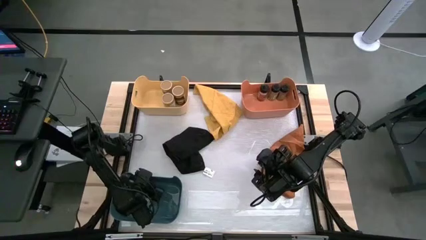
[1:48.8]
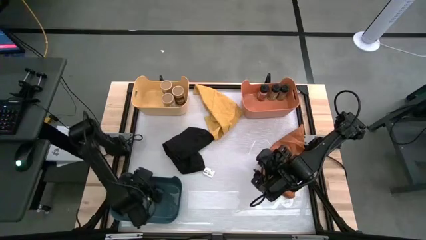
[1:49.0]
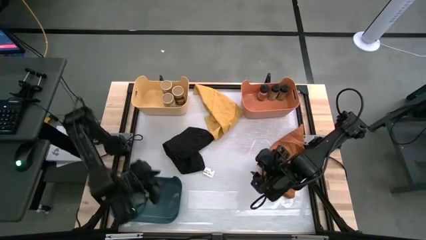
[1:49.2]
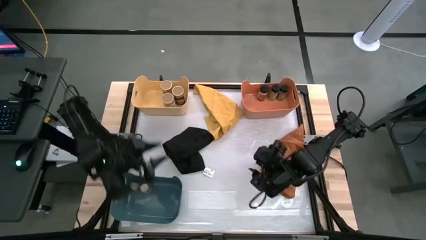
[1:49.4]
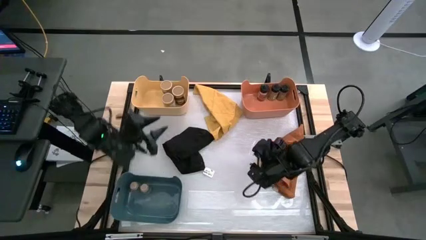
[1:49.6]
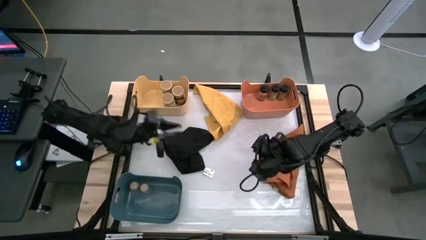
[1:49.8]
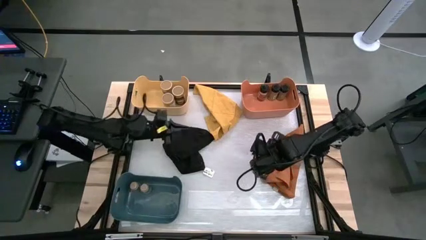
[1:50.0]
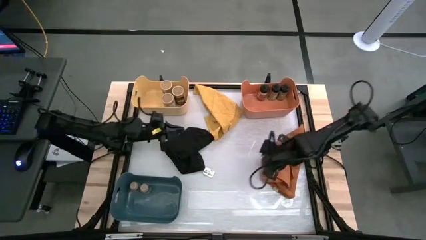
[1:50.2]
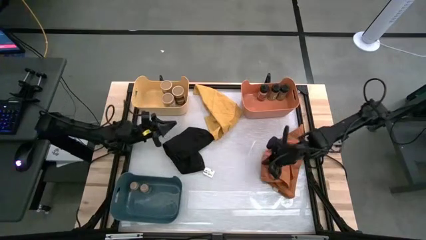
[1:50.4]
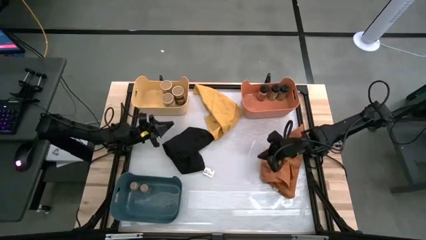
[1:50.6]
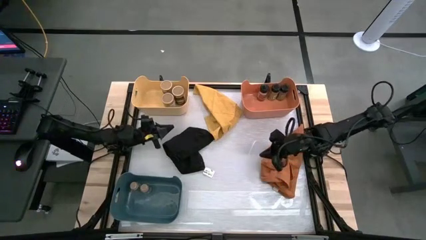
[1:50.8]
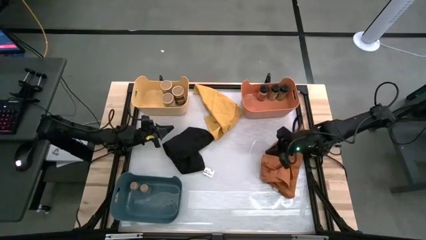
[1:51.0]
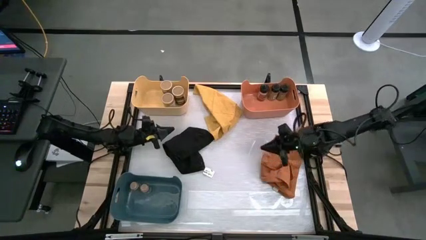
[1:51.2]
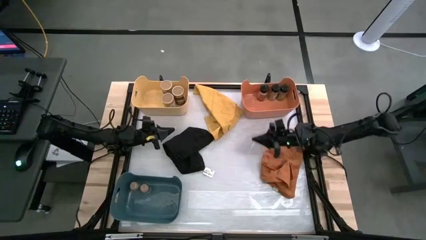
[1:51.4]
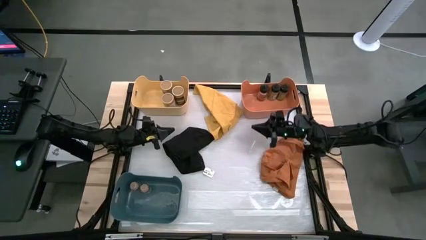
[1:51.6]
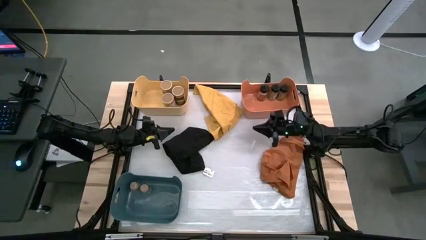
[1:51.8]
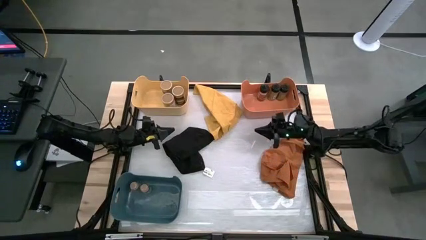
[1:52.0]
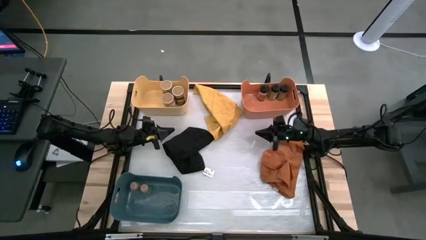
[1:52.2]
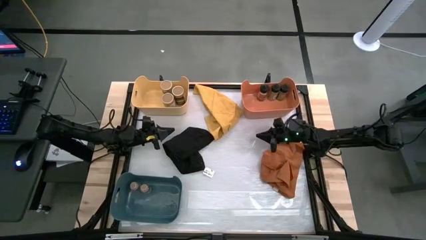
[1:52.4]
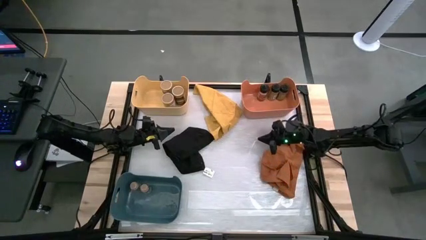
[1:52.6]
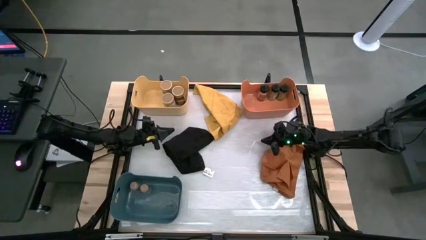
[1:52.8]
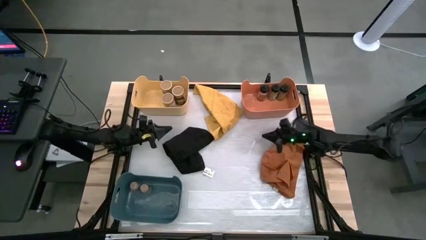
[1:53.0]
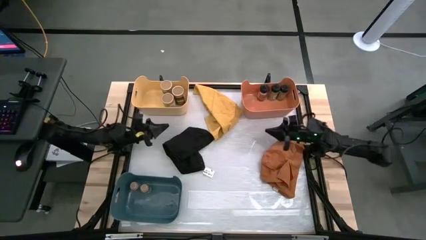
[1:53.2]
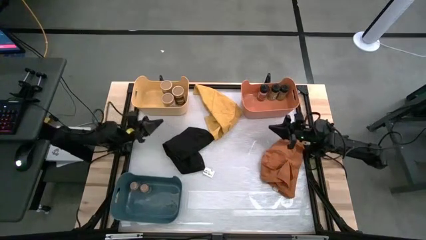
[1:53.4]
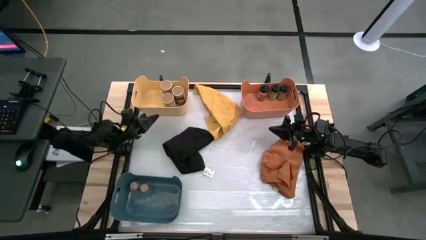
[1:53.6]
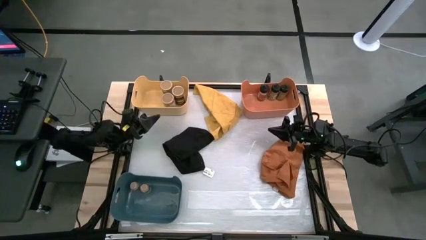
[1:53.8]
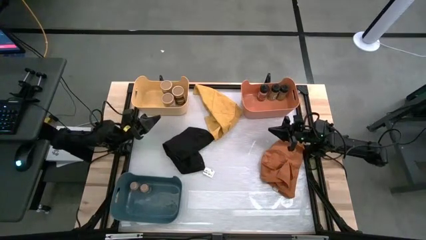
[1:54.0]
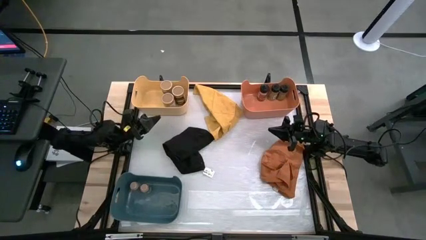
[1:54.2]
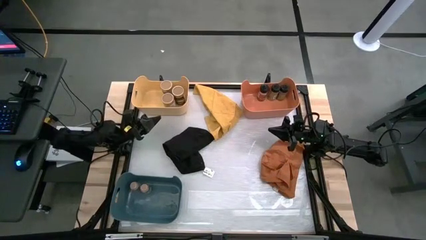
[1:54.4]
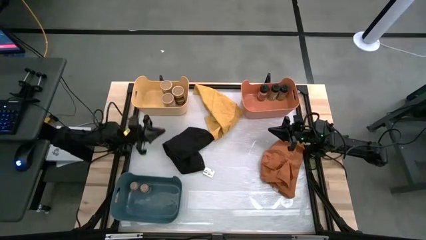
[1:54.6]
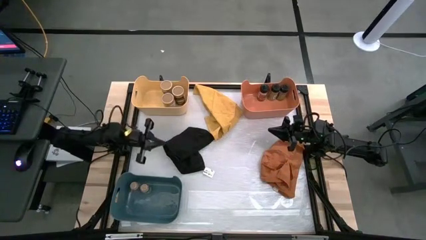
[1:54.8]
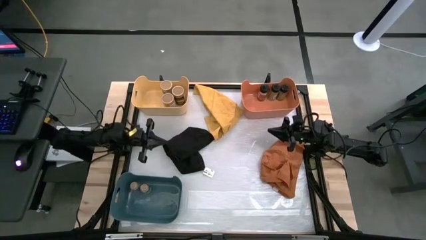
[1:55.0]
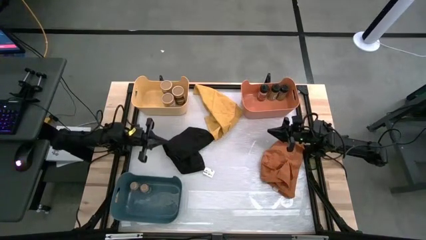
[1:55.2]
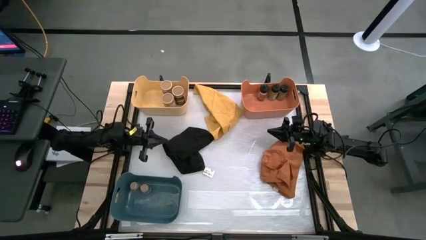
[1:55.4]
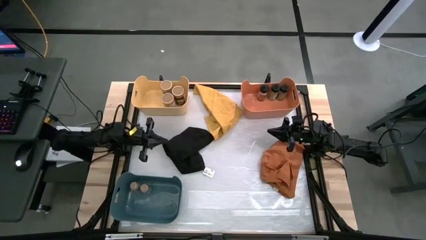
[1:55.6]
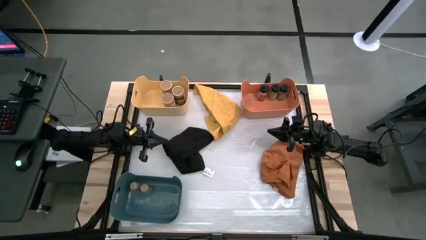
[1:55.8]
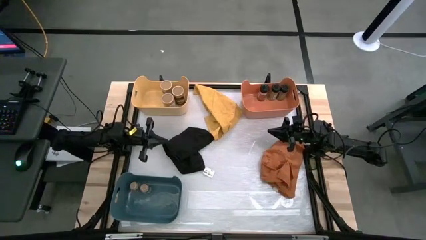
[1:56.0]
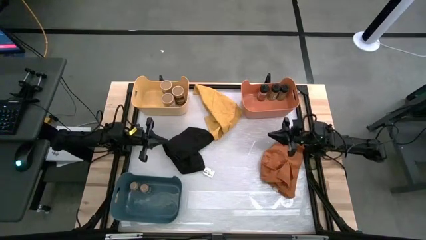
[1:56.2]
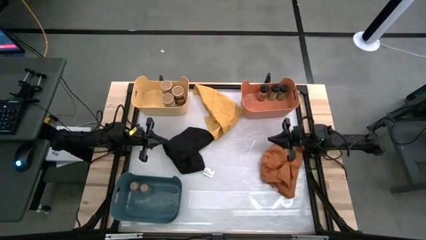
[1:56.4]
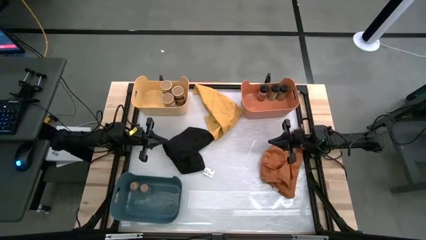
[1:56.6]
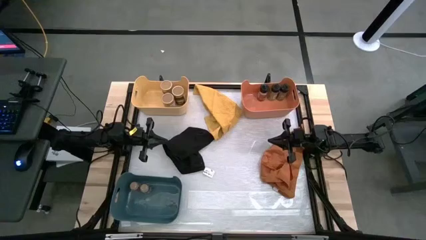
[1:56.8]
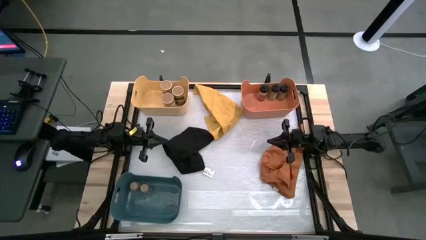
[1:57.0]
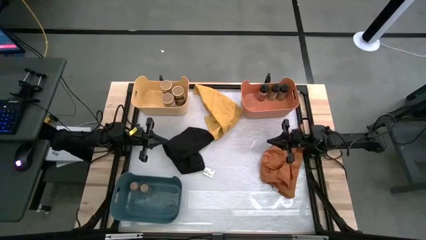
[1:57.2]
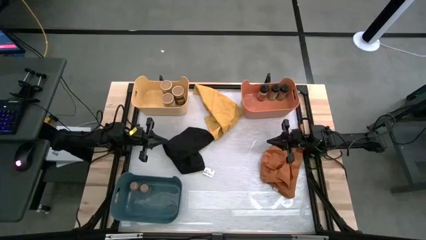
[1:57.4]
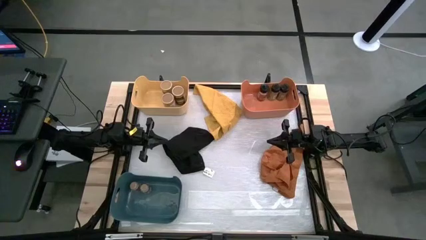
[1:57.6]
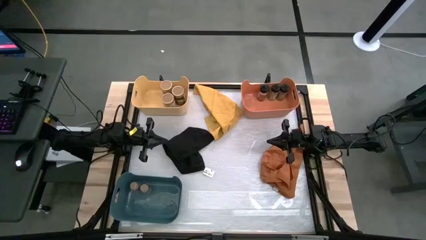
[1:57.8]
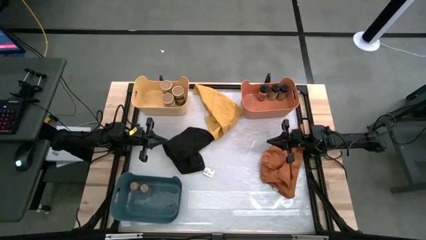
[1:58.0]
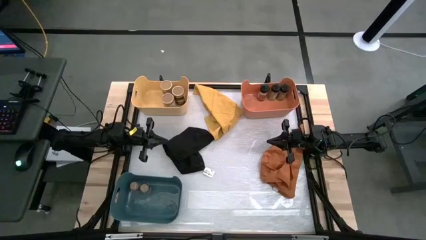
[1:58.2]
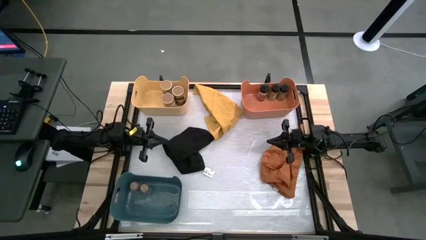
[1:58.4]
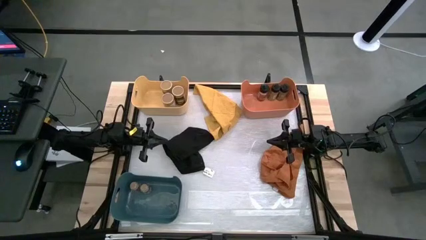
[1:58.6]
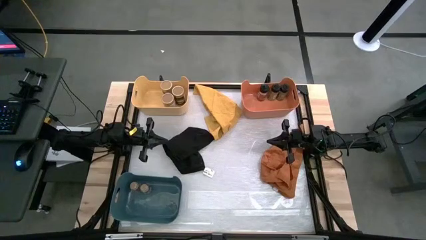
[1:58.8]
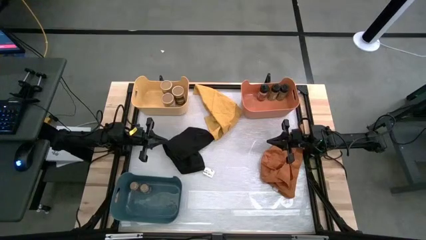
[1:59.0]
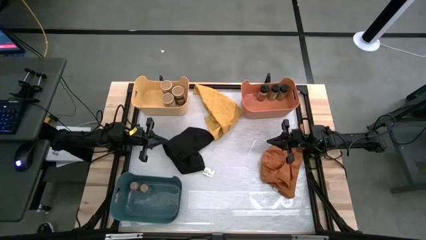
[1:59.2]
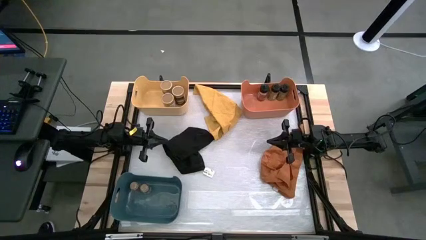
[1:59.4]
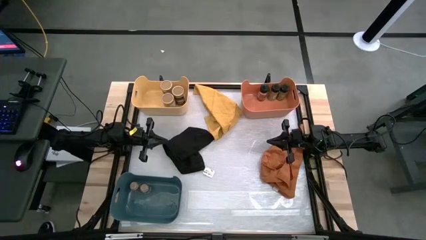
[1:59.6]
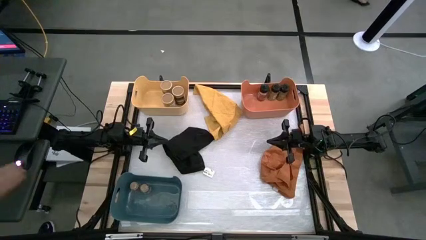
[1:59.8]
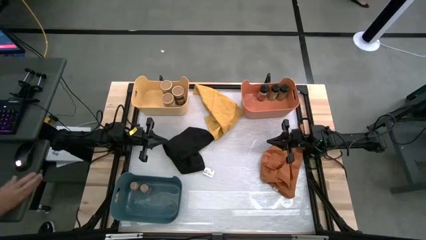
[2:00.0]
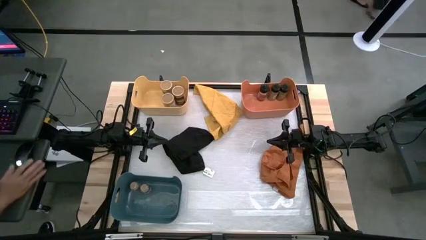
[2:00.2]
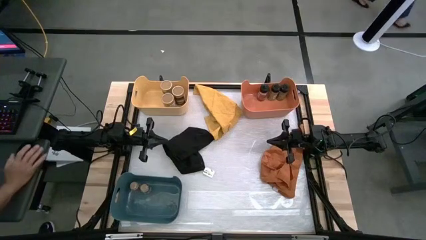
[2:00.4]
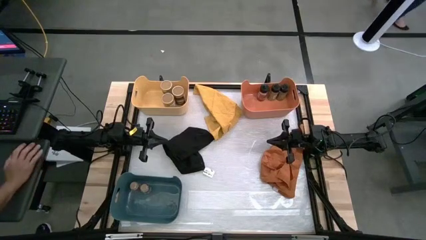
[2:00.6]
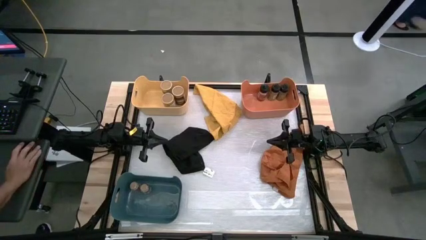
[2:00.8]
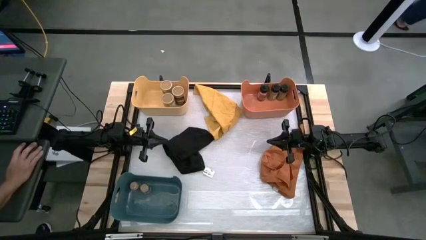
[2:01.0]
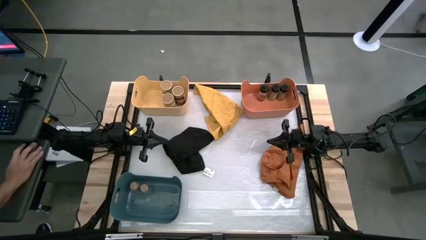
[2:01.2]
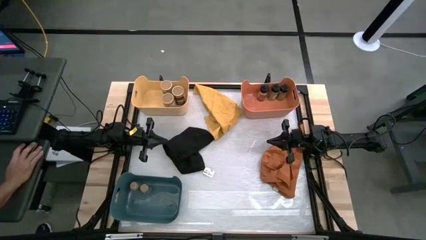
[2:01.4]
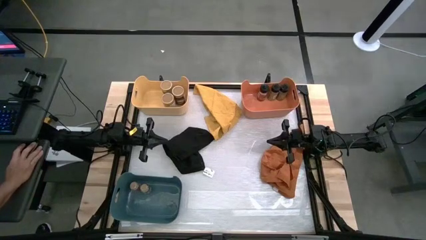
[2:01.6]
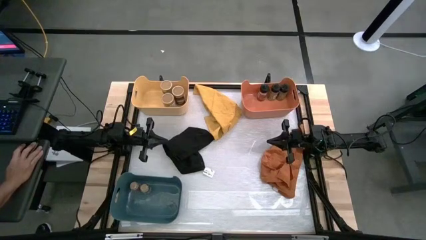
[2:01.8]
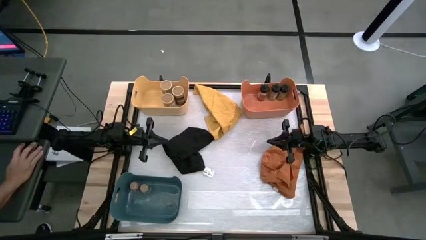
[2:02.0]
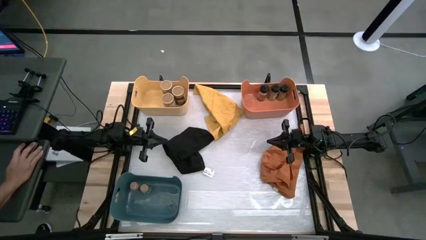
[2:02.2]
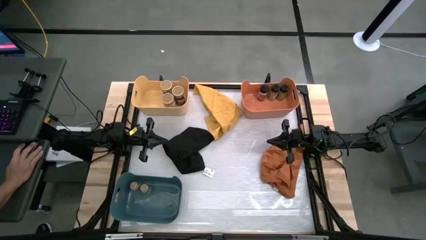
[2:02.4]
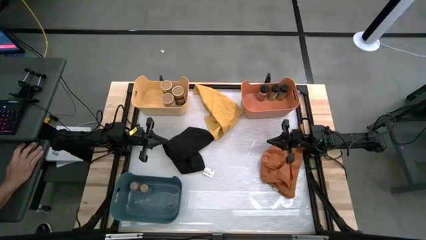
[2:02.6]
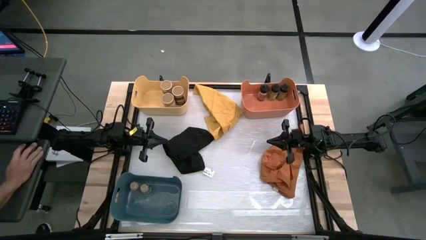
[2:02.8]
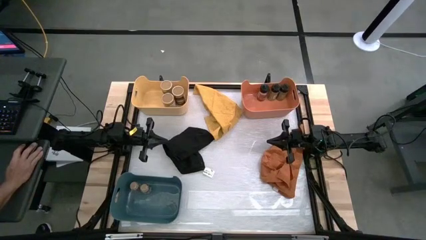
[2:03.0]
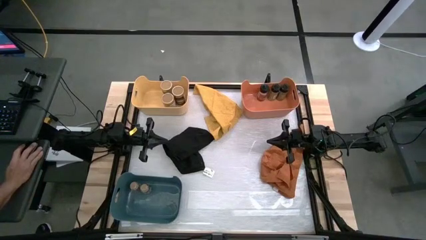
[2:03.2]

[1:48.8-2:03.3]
Task: Sort spices by type
Return to Home Position
